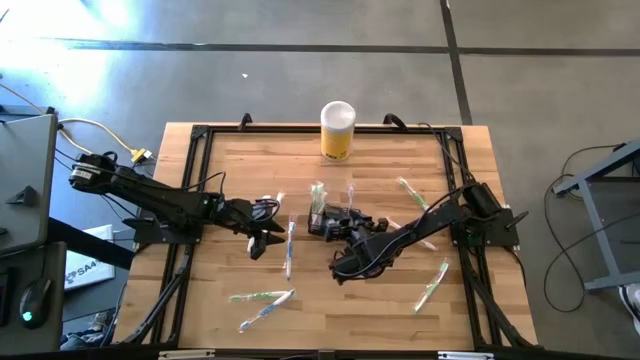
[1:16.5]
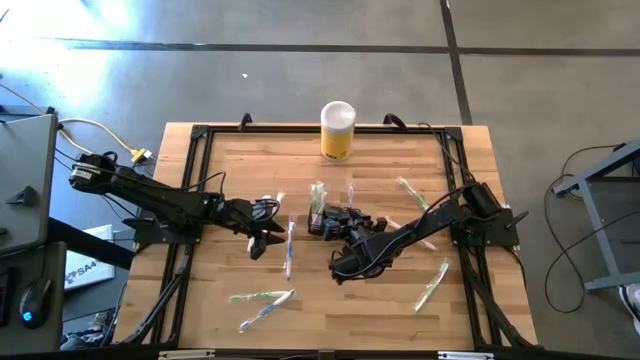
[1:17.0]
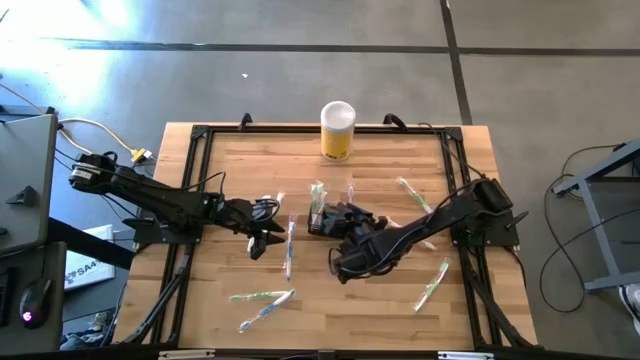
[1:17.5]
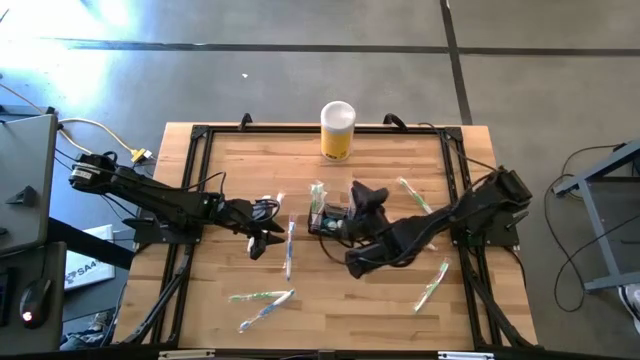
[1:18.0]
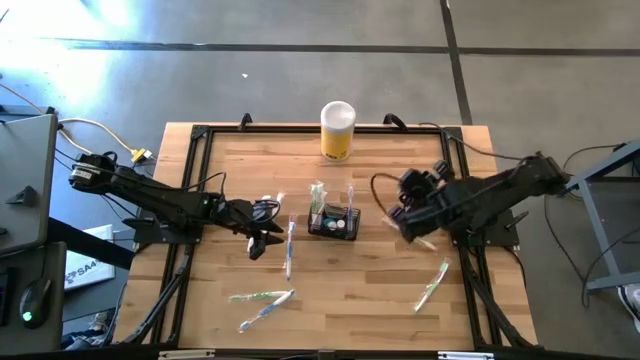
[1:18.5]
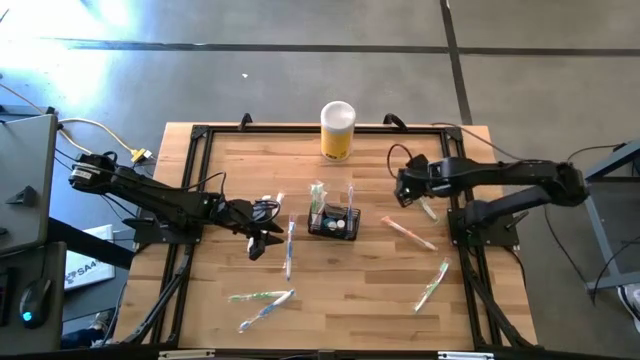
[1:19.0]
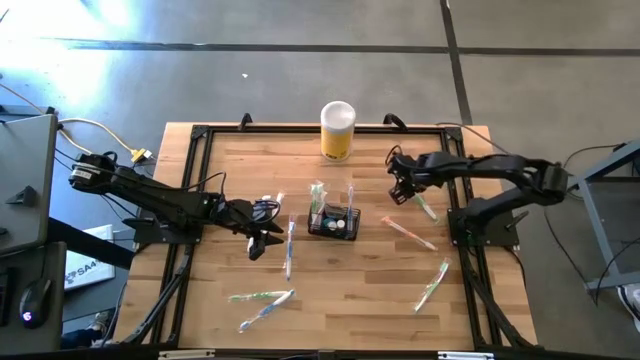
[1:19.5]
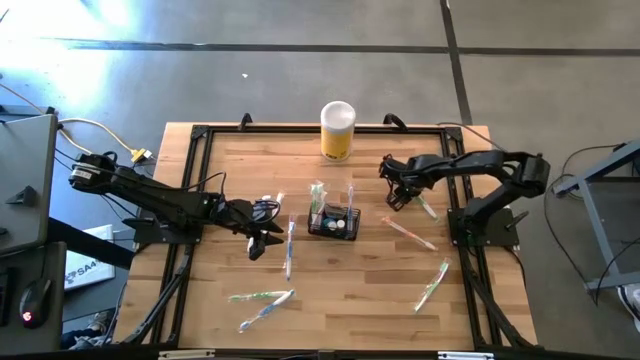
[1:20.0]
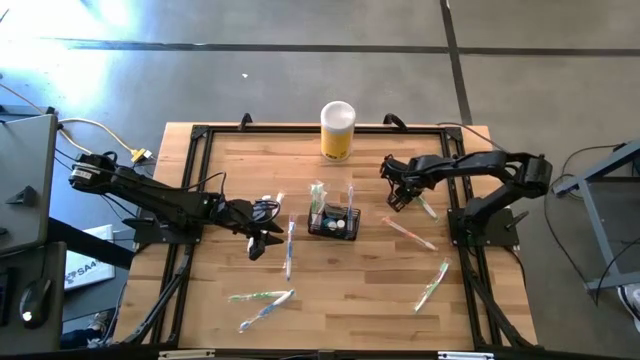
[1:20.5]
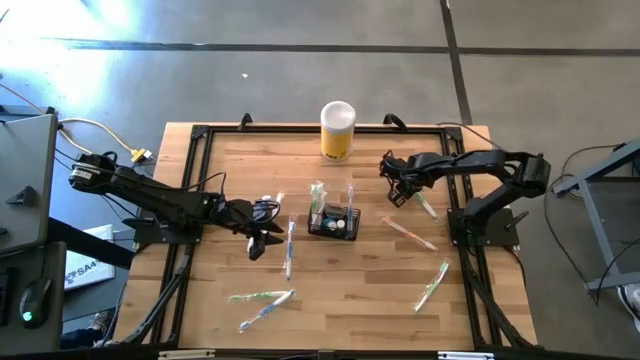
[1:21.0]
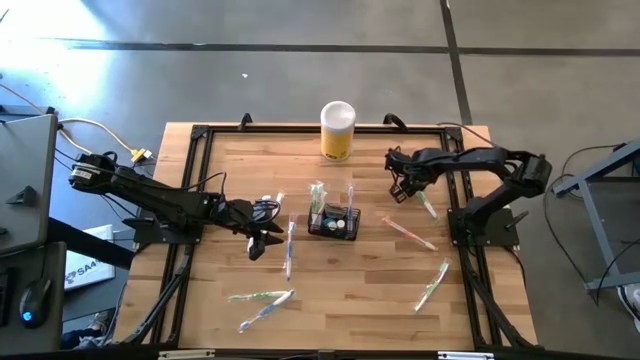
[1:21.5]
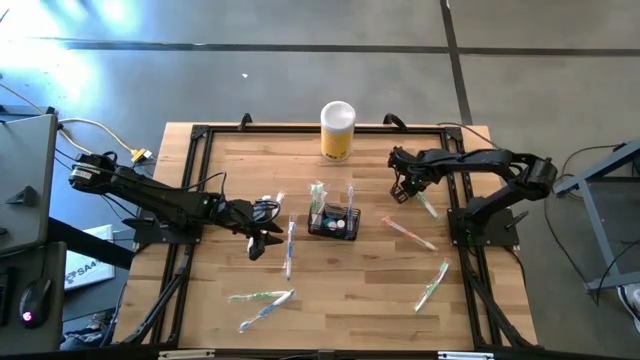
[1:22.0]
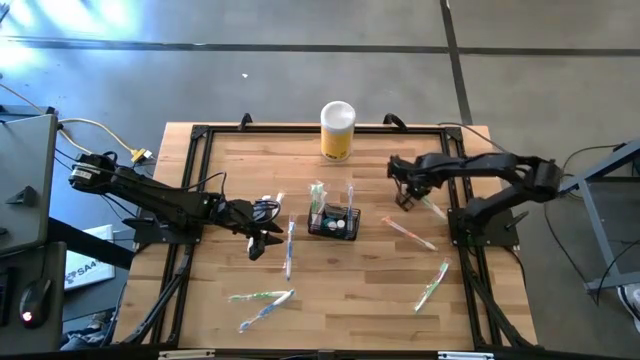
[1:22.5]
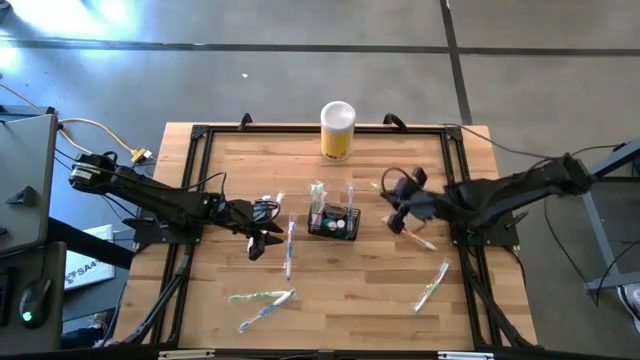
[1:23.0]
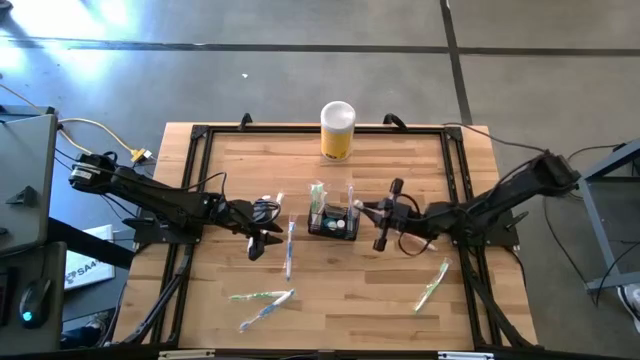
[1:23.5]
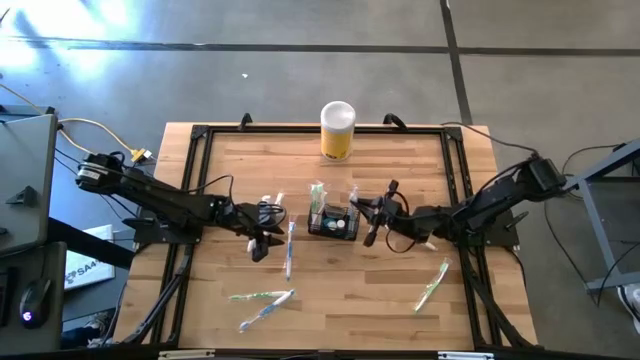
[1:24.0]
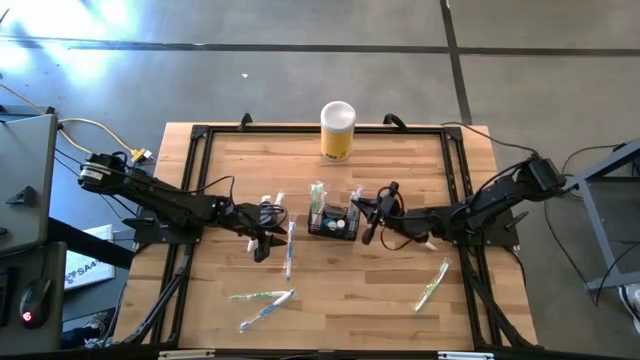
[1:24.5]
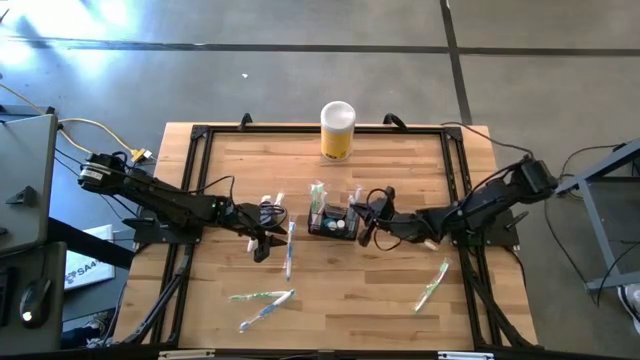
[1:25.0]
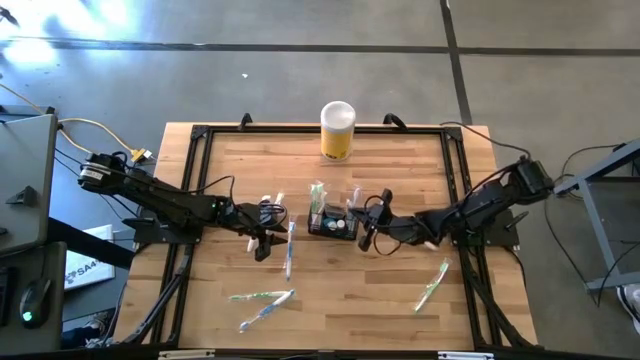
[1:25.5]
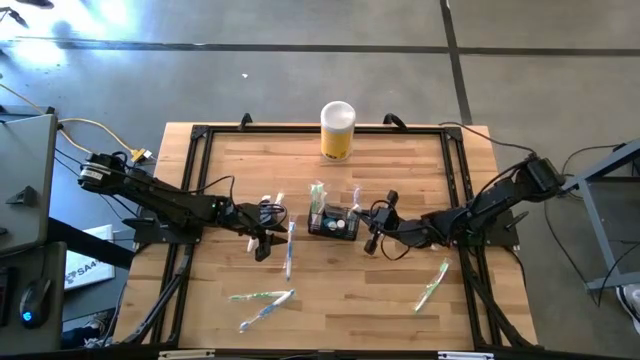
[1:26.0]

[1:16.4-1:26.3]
Task: Pick & Place toothbrushing station
Put the green toothbrush into the wire organizer

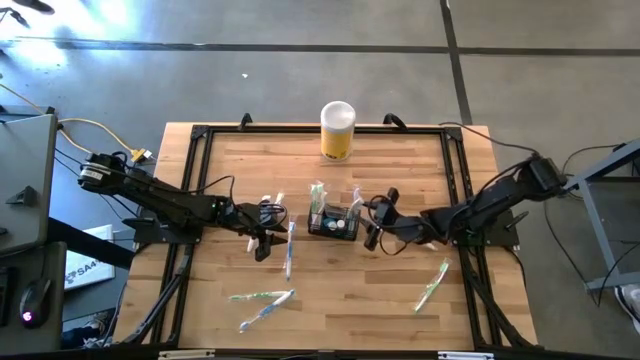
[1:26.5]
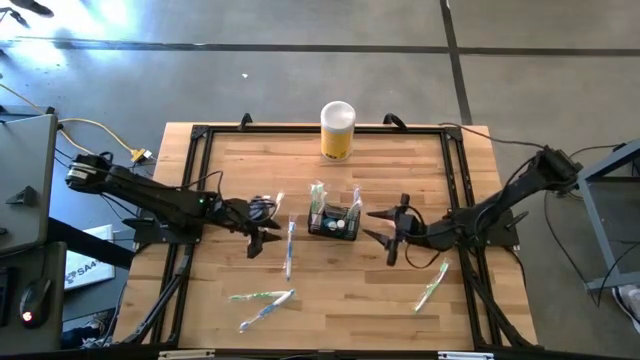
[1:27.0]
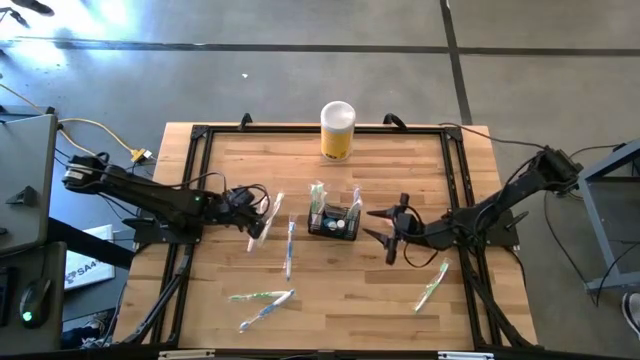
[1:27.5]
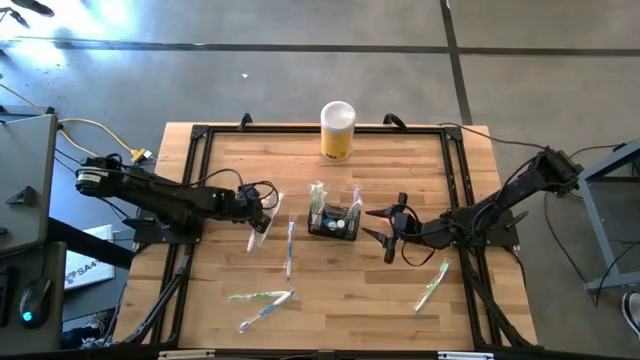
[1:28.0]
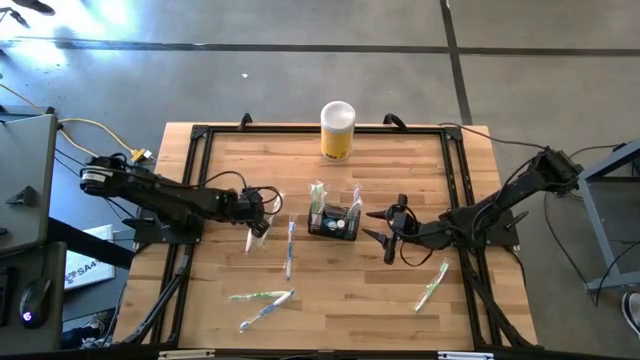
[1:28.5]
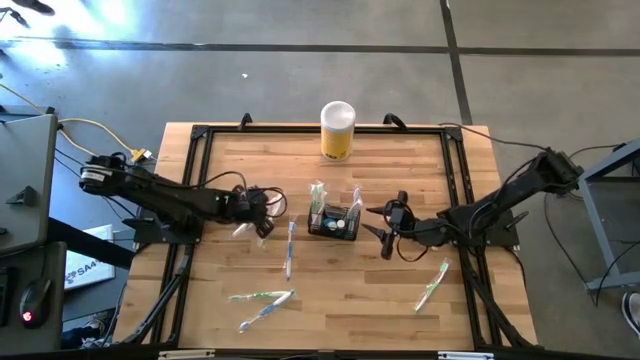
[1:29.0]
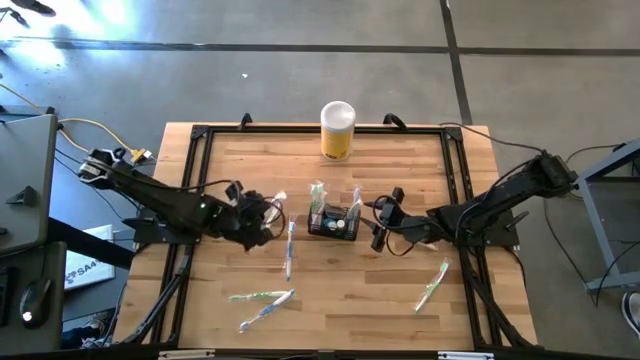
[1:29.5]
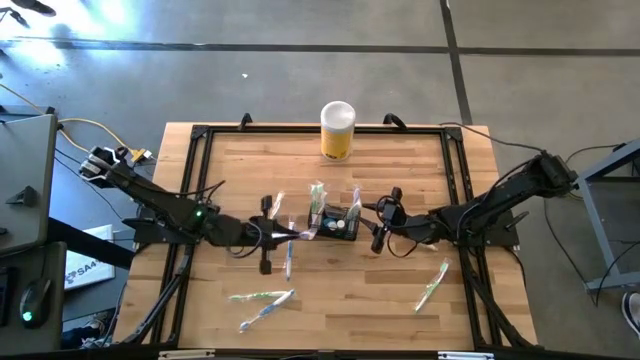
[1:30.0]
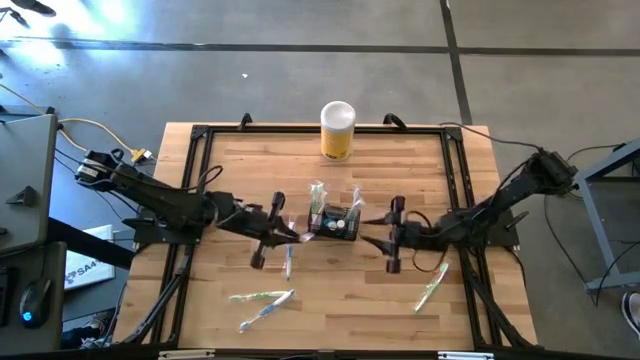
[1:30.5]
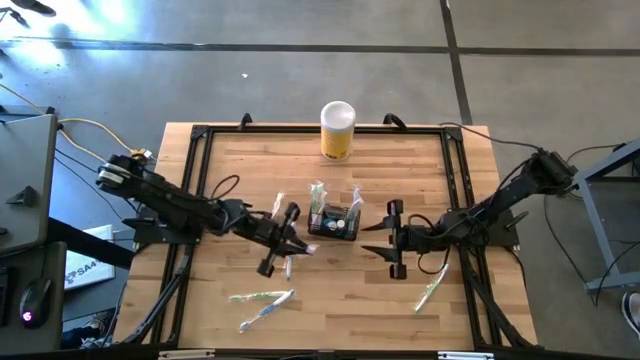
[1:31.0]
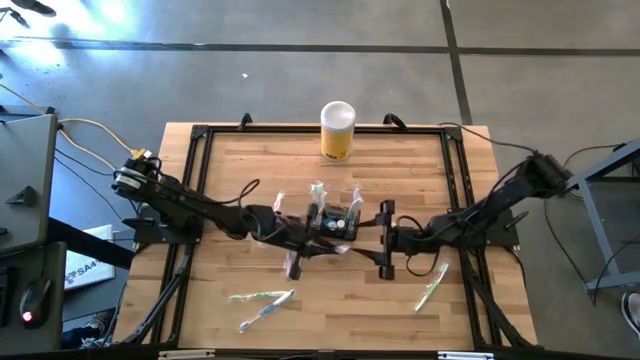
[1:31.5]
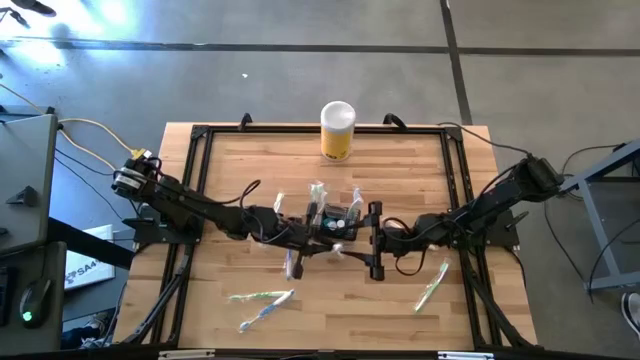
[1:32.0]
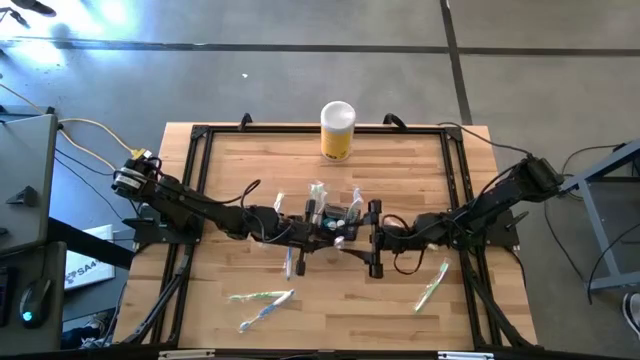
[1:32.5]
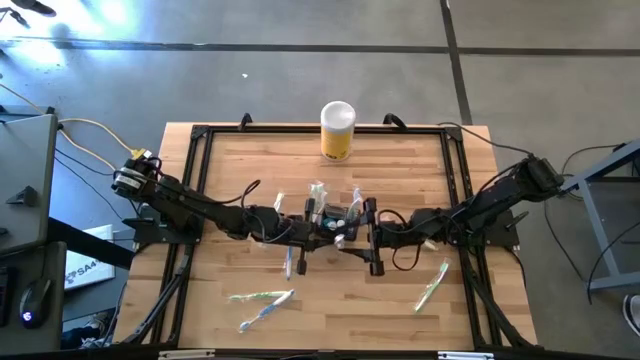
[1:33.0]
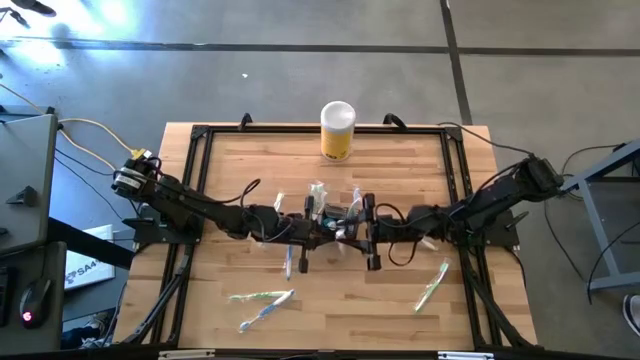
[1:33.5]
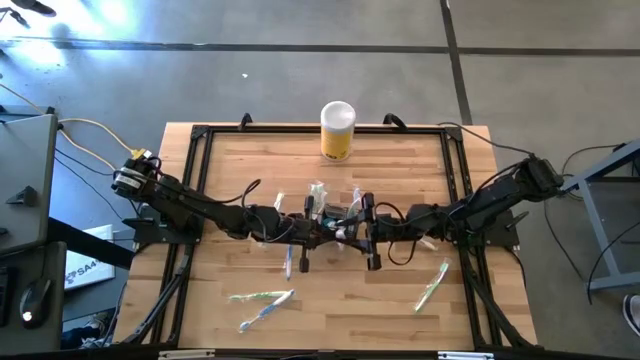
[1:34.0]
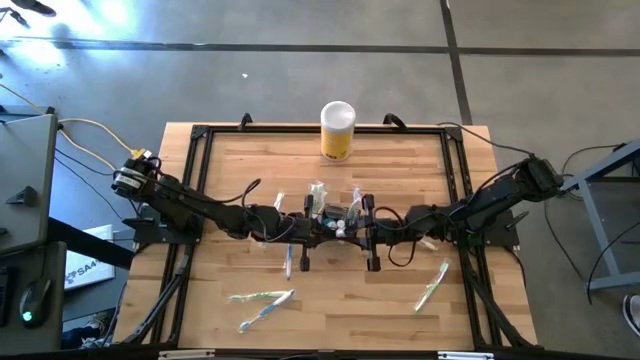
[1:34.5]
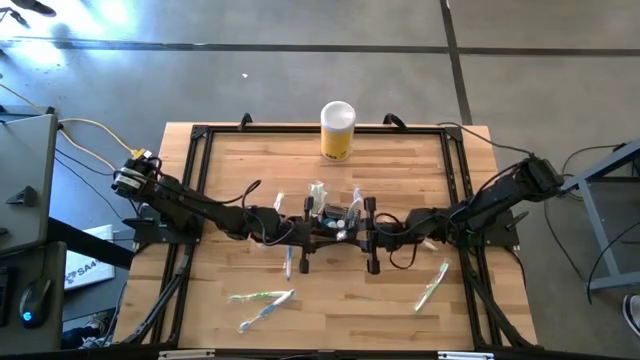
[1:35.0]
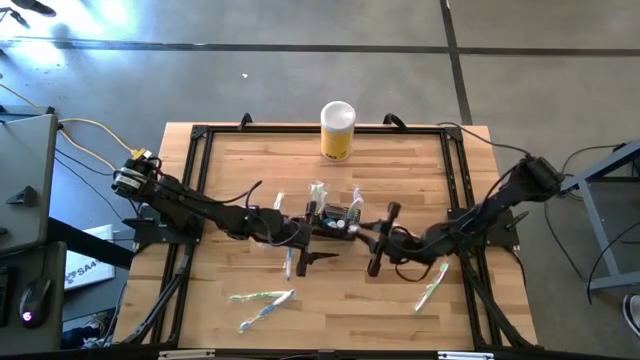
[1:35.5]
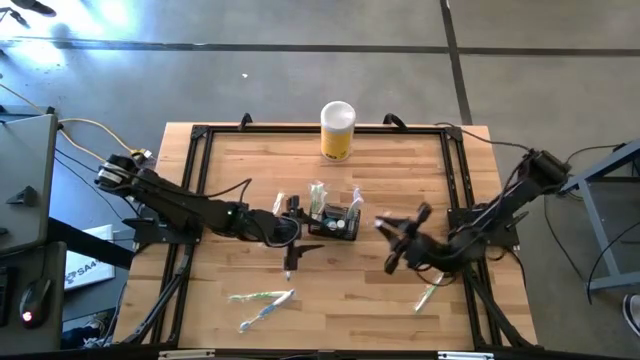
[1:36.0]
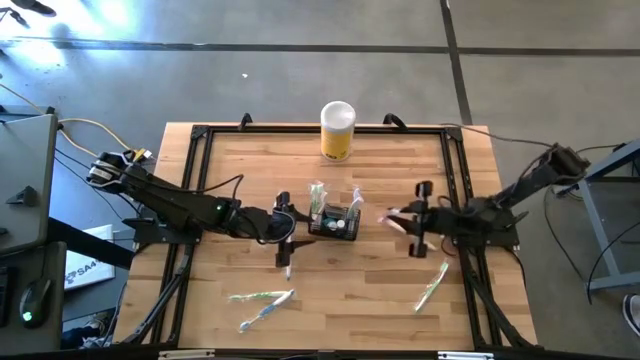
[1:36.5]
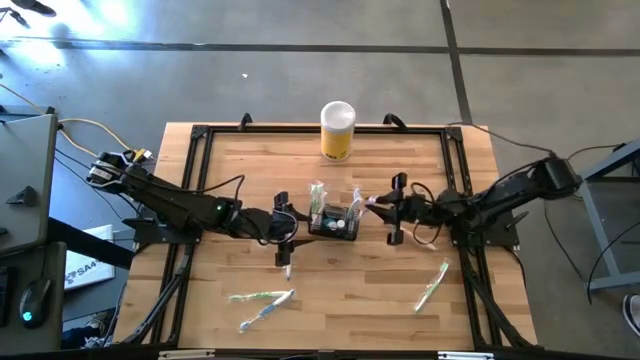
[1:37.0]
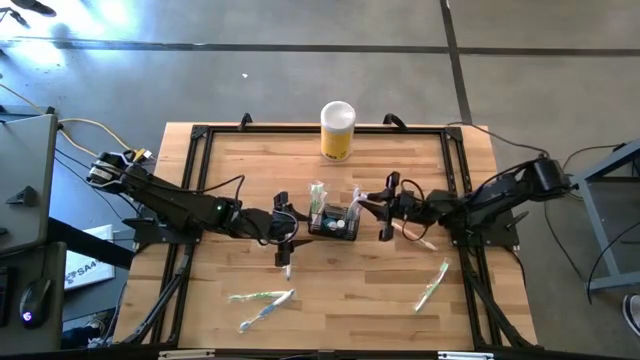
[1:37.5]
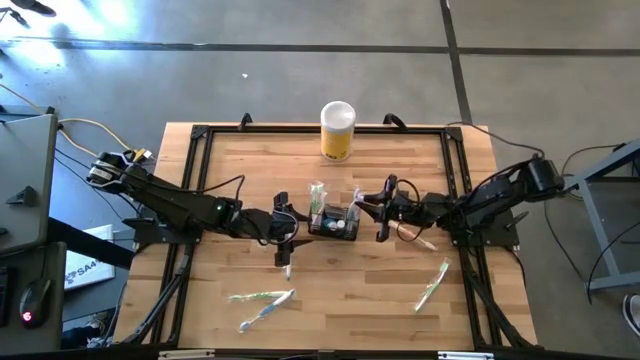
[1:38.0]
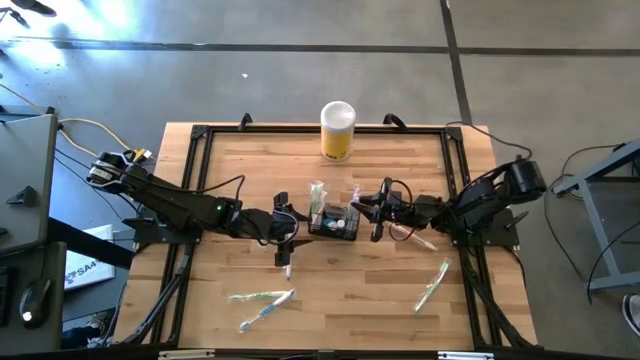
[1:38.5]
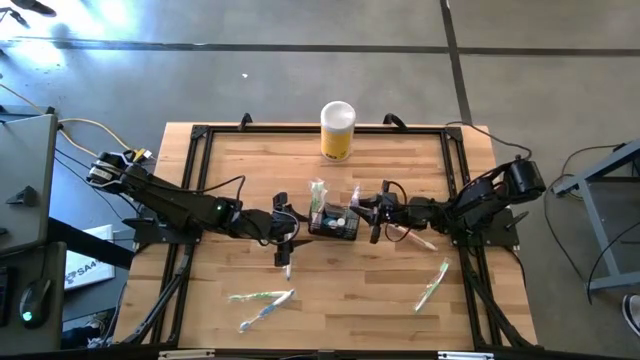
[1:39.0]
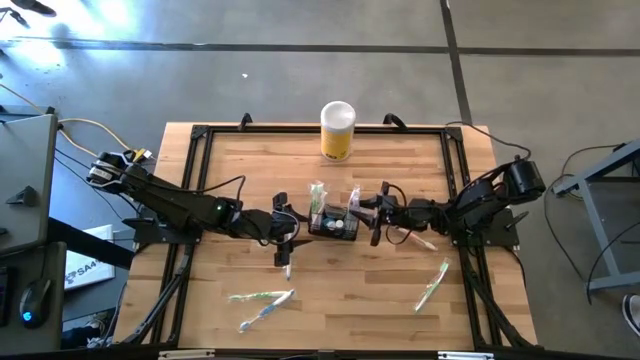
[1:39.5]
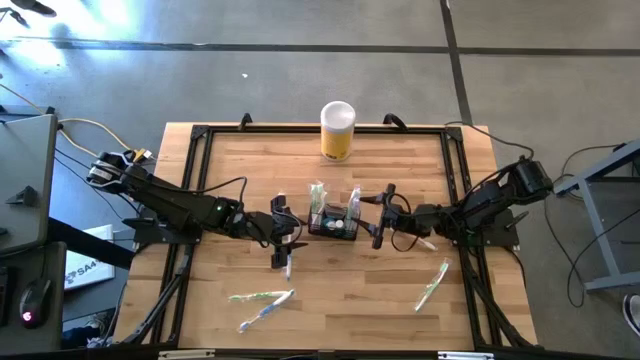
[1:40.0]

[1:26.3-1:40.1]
Put the purple toothbrush into the wire organizer
